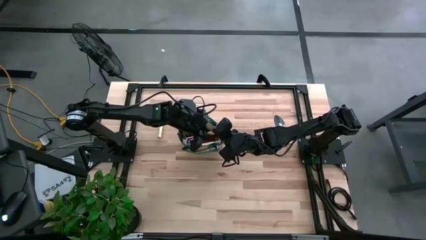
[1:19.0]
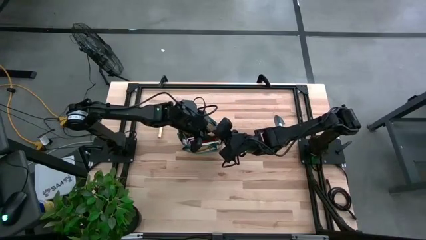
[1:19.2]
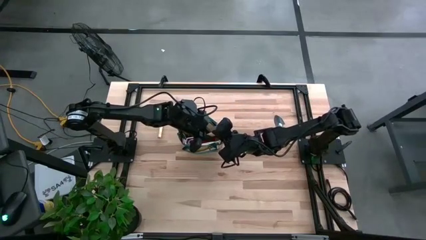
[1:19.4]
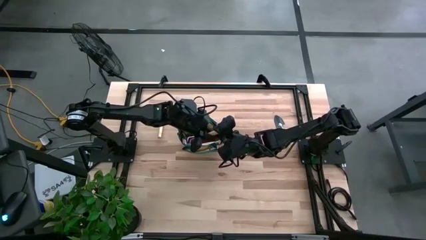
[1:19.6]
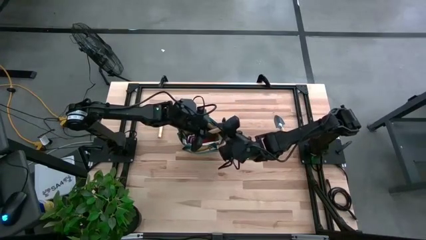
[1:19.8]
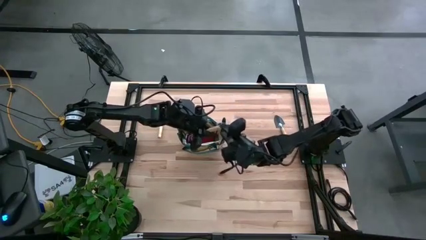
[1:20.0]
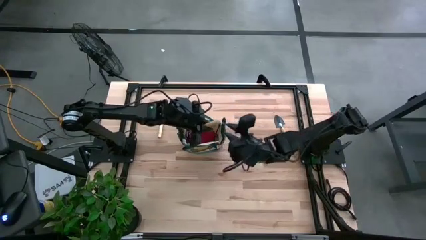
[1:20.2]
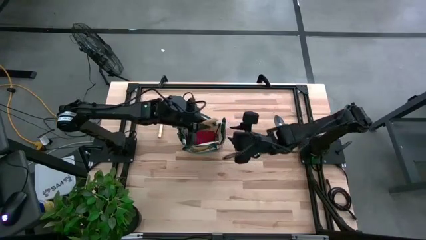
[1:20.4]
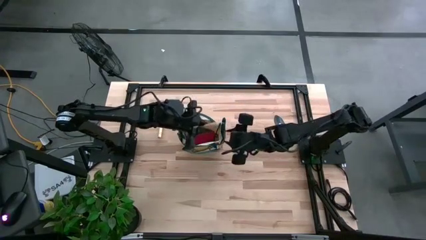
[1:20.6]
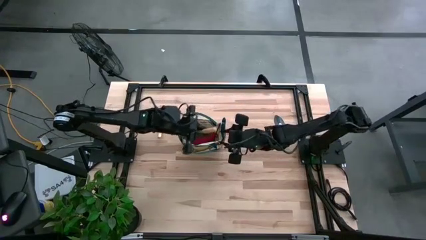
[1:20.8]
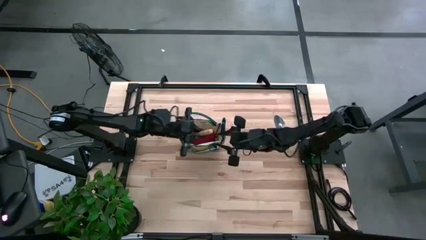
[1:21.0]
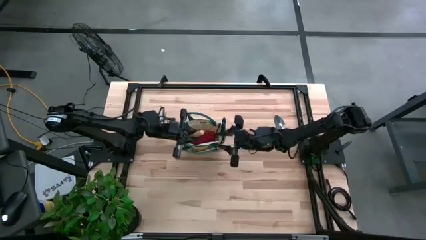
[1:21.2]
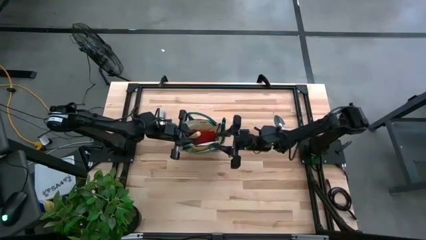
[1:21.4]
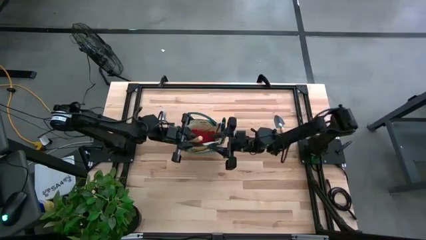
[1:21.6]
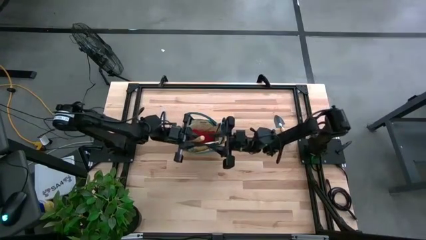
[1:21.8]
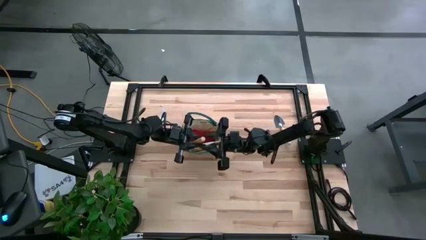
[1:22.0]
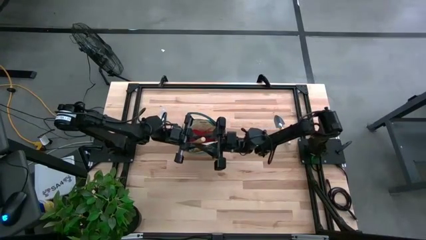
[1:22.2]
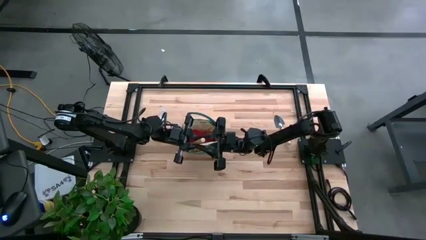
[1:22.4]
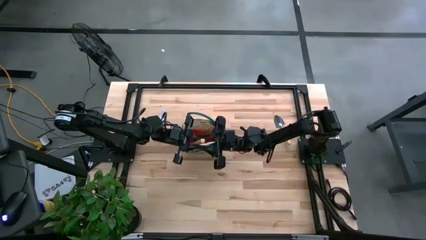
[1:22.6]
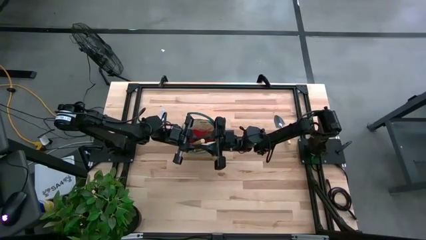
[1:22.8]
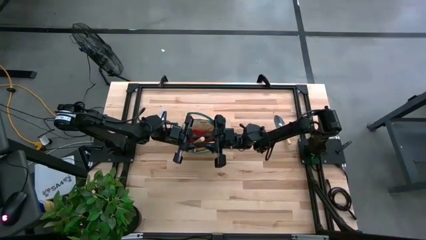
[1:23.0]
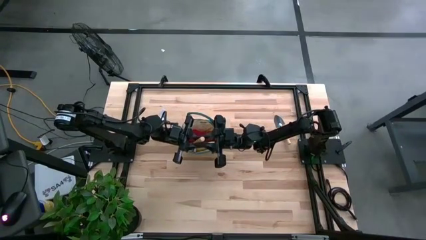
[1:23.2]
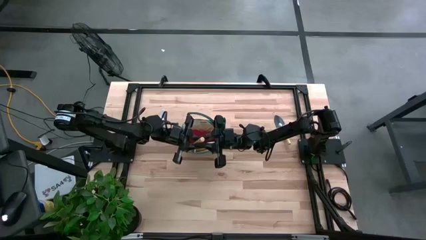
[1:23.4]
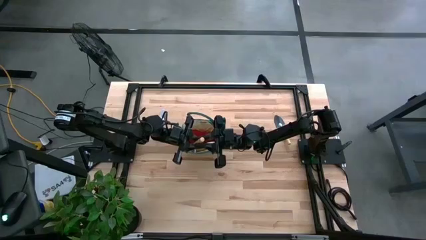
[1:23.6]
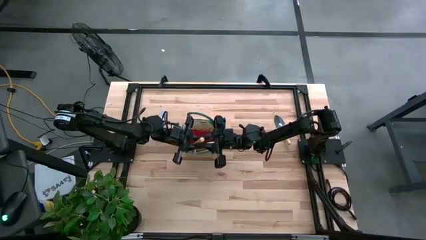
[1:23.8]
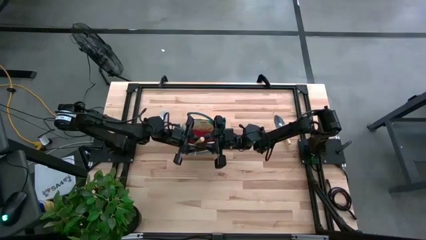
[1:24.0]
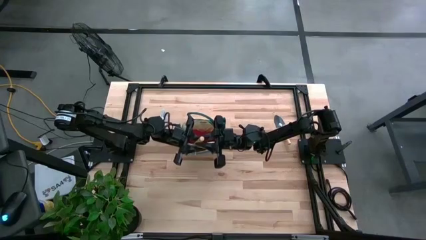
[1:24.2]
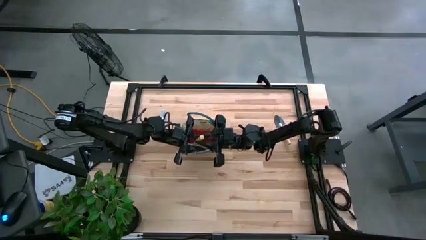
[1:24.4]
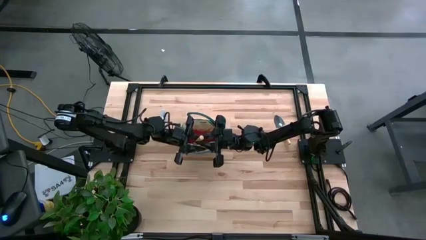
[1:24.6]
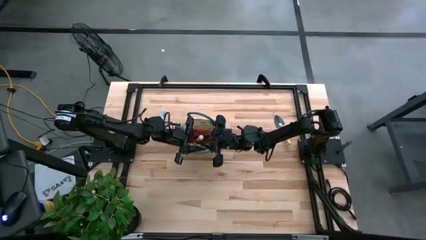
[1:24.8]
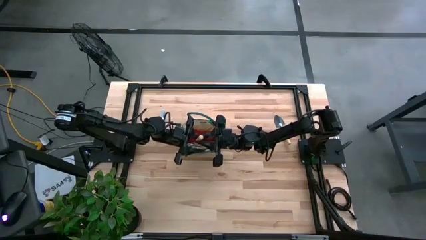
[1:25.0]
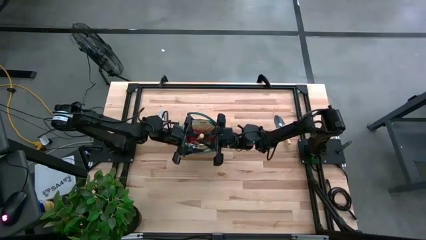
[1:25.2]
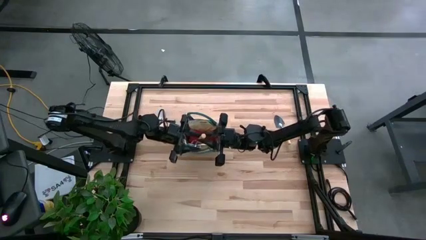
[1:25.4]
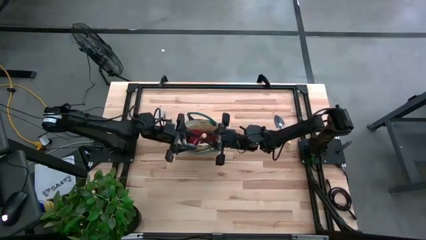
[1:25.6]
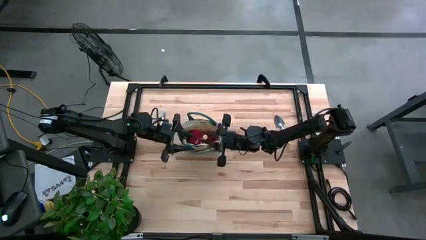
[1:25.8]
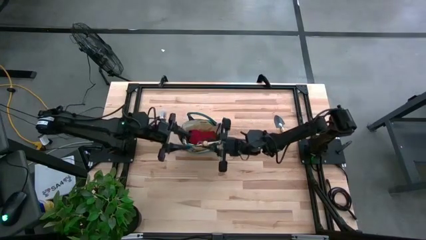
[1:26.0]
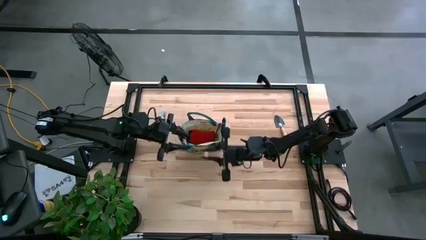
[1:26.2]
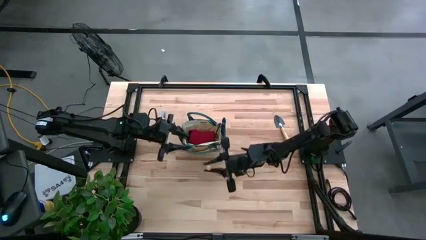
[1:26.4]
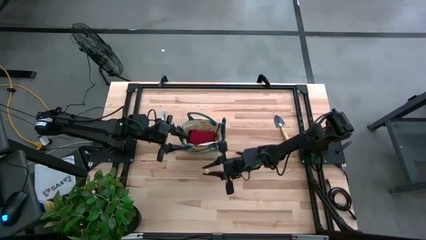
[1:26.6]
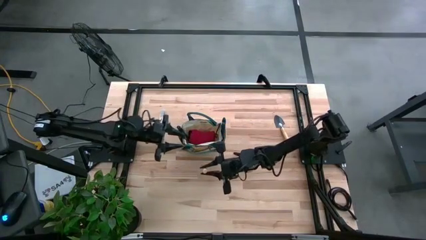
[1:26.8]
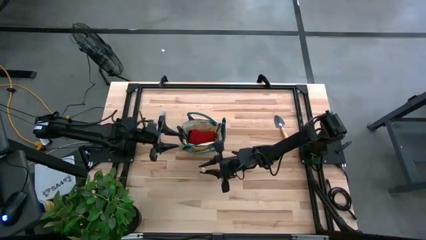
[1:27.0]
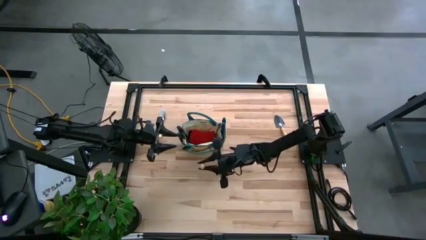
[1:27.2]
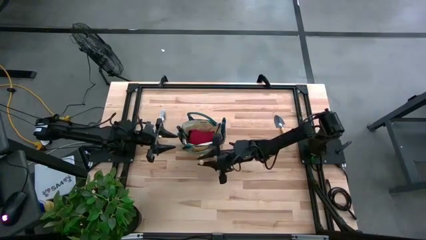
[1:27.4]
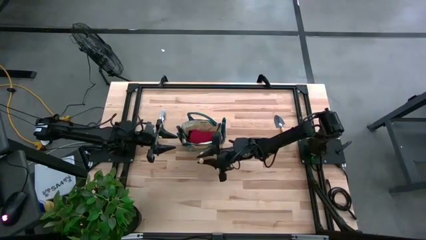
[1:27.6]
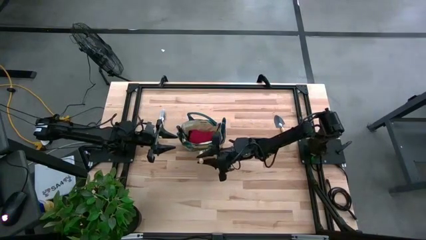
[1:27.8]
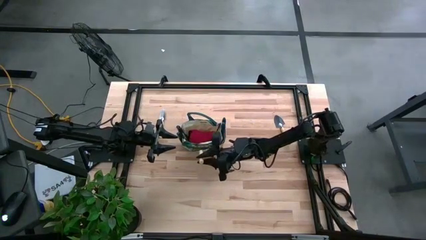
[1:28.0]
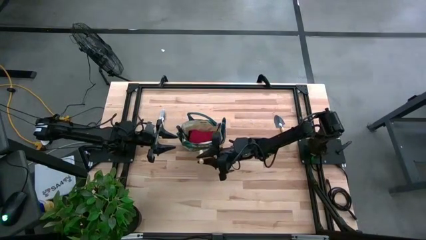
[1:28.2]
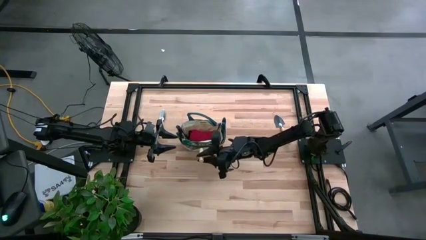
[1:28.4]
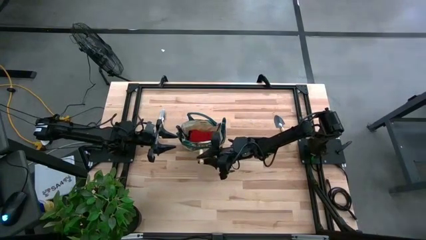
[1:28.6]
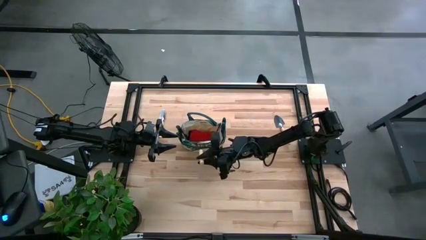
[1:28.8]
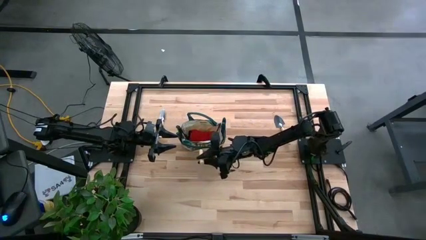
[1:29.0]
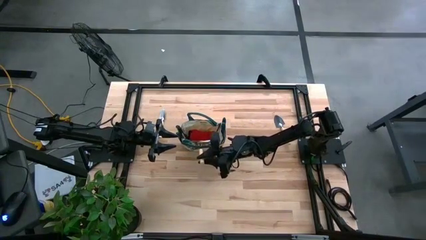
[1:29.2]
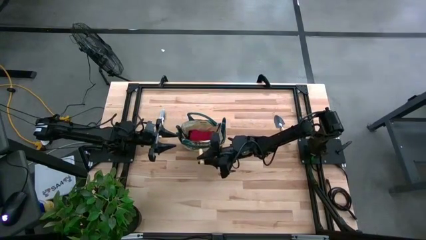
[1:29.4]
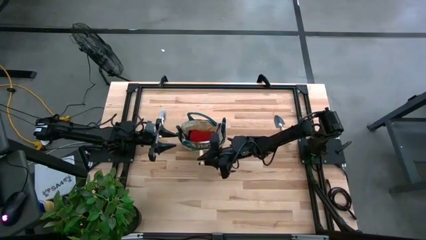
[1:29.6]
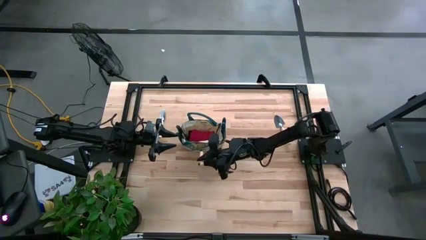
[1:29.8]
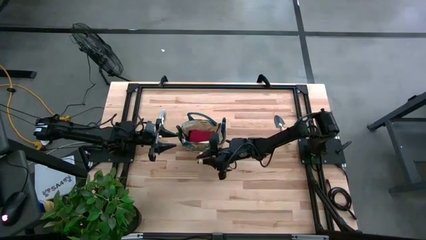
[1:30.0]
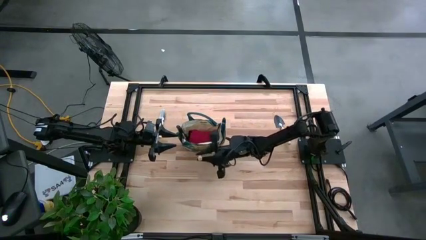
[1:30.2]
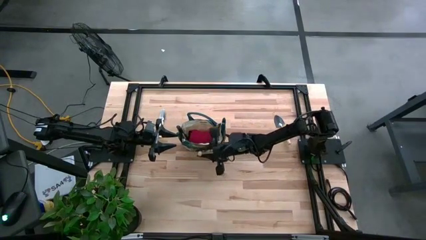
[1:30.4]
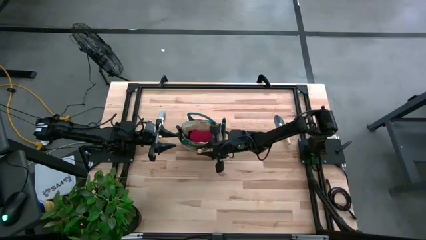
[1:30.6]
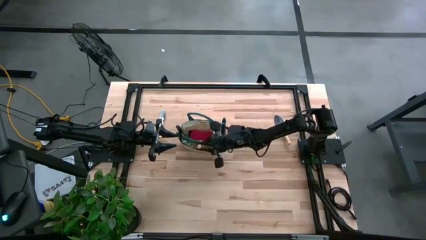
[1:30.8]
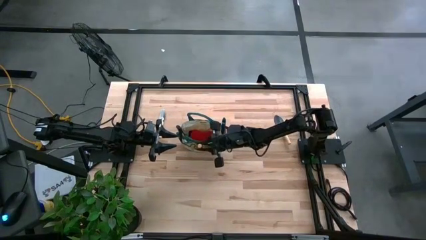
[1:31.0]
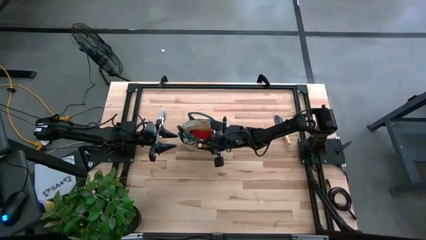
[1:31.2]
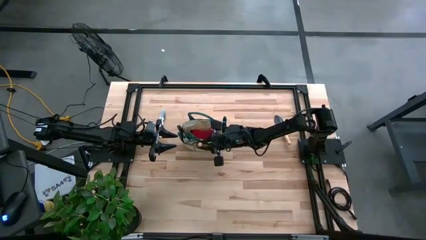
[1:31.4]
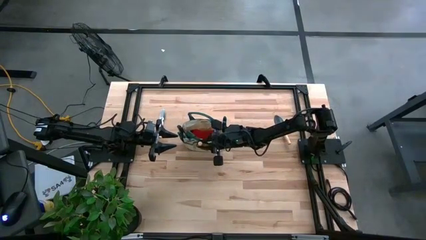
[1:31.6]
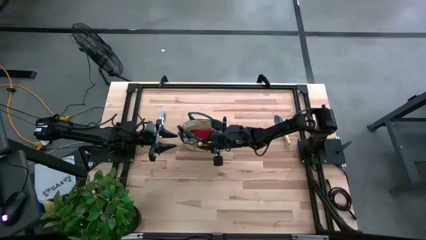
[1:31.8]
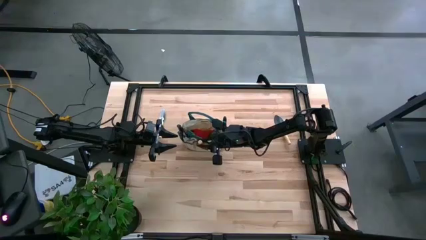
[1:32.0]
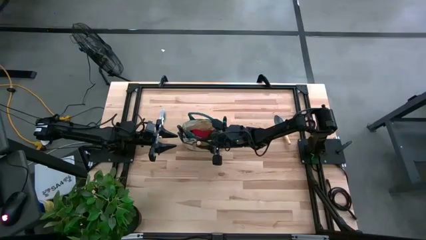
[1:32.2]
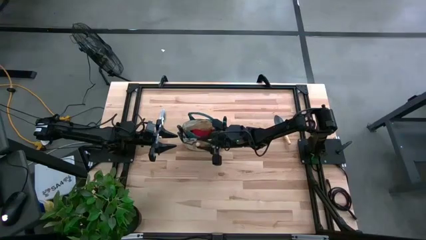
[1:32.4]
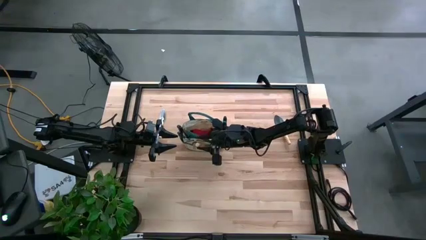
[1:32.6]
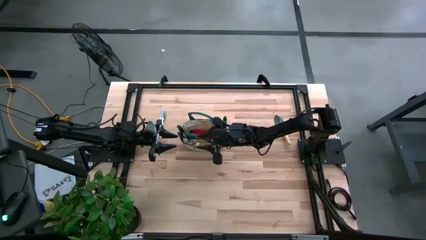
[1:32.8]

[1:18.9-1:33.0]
Task: Pick & Place Garden tools in Gardening bag
Put the light brown hand rake into the light brown gardening bag

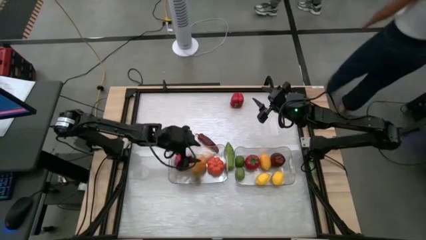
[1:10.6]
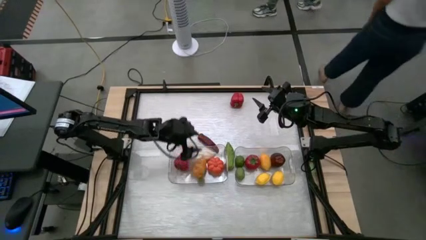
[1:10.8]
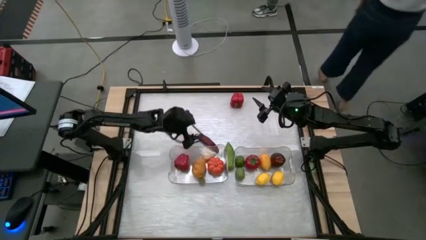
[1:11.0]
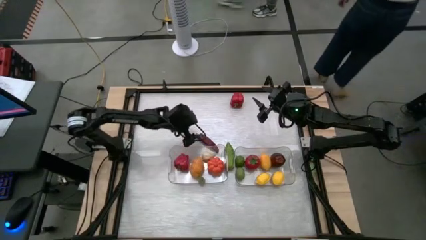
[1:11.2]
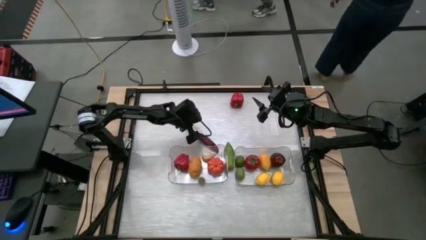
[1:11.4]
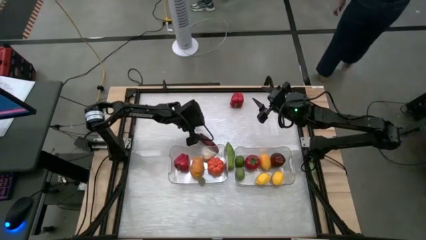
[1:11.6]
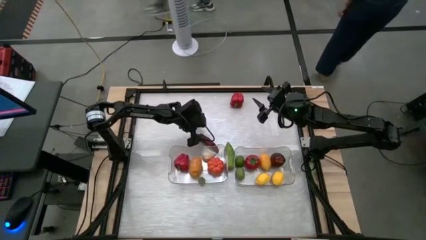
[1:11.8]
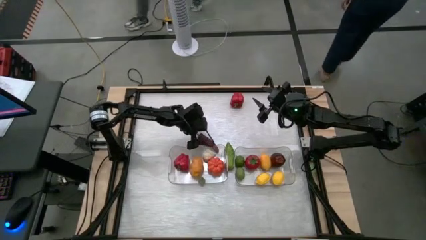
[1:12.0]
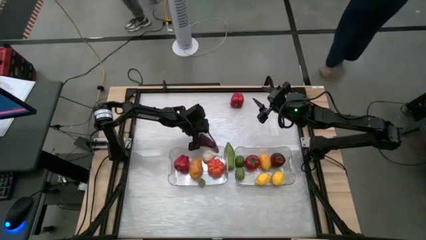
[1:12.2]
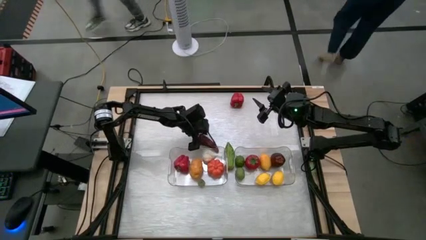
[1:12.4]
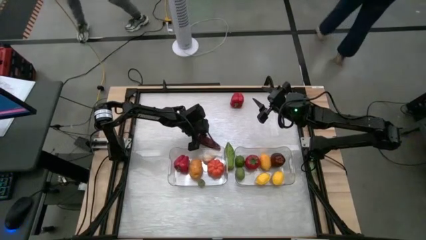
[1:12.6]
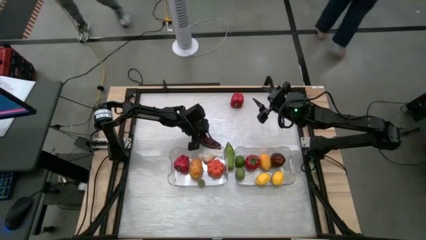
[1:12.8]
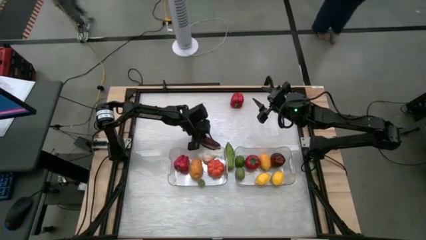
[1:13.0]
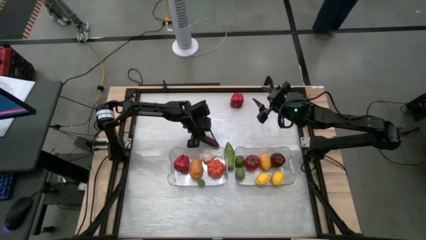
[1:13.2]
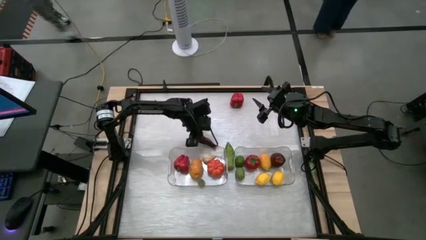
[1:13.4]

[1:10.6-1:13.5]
Task: Sort produce into baskets
Put the red chili pepper into the left transparent bin

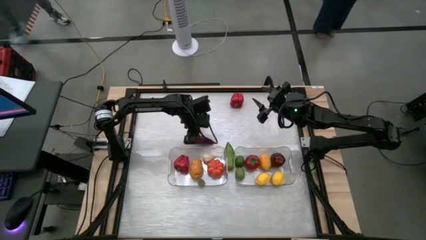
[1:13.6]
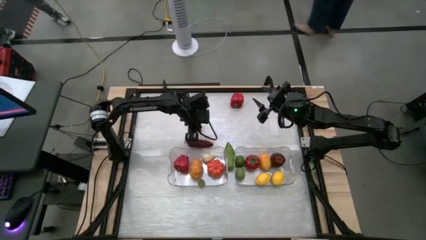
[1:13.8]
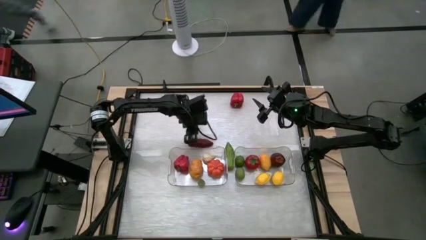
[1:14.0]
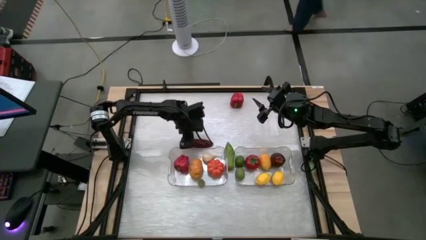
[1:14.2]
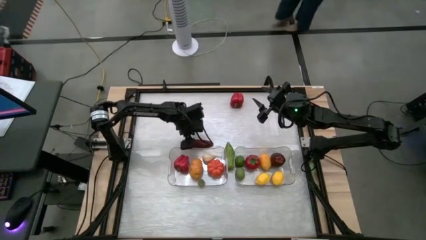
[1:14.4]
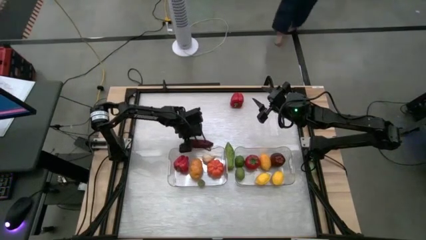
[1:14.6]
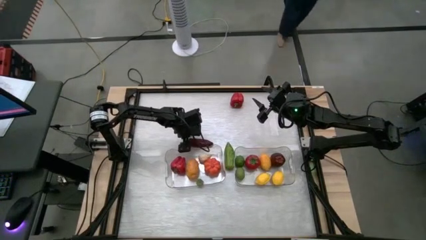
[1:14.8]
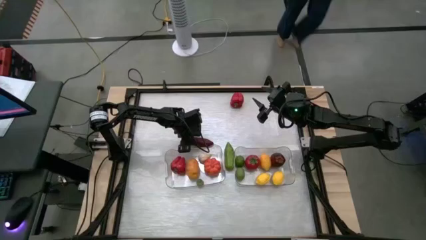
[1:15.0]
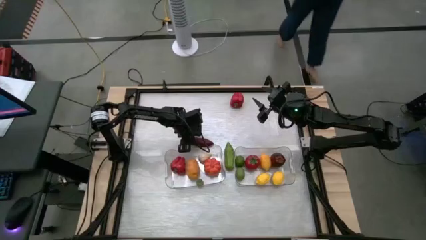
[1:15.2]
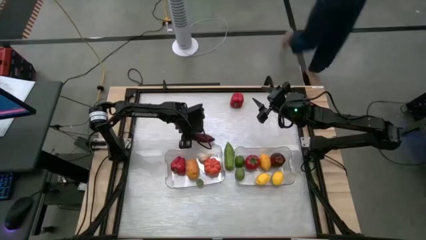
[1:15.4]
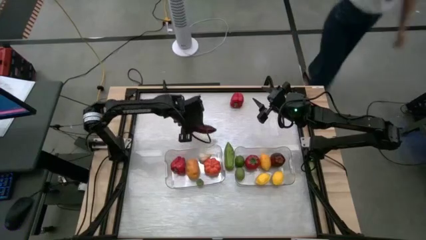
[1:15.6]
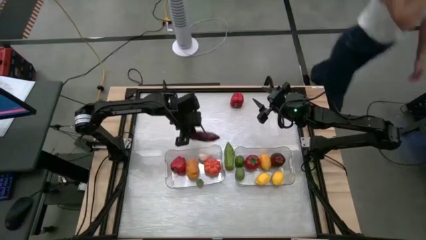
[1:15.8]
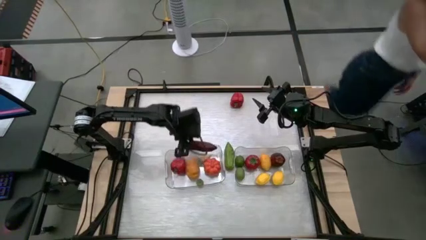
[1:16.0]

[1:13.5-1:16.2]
Put the red chili pepper into the left transparent bin
